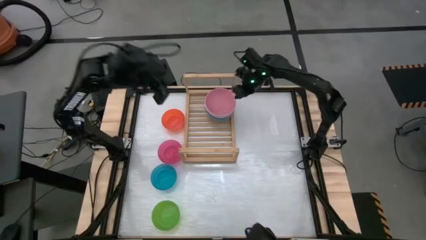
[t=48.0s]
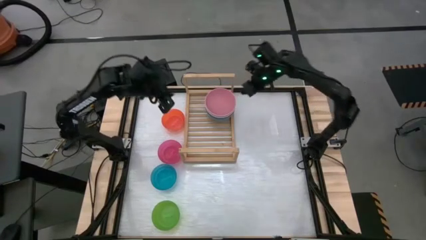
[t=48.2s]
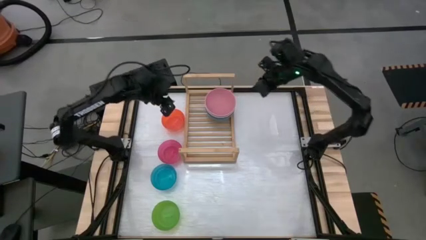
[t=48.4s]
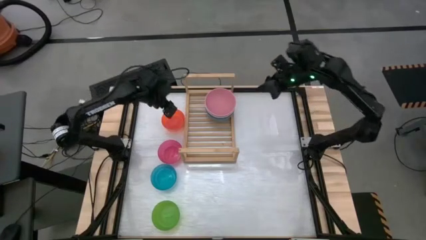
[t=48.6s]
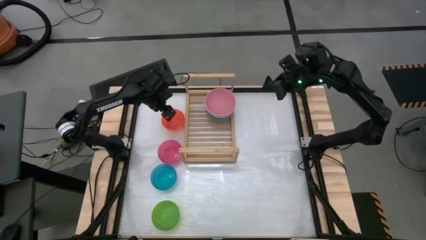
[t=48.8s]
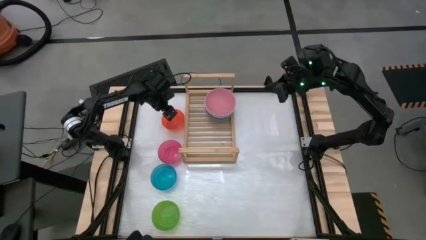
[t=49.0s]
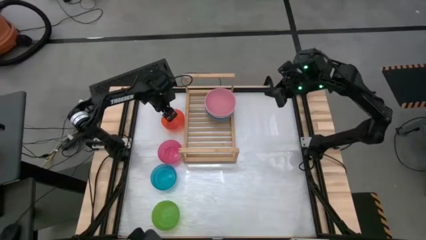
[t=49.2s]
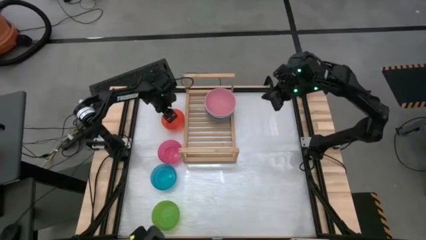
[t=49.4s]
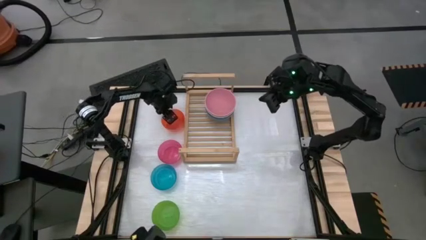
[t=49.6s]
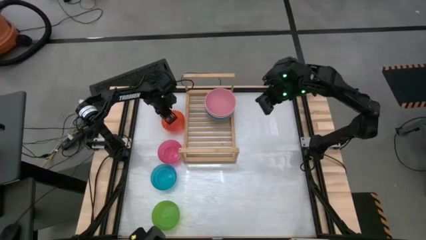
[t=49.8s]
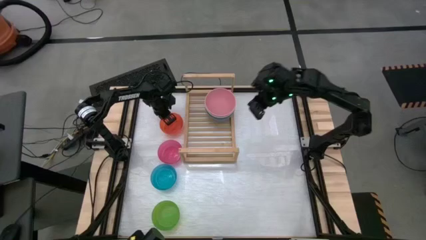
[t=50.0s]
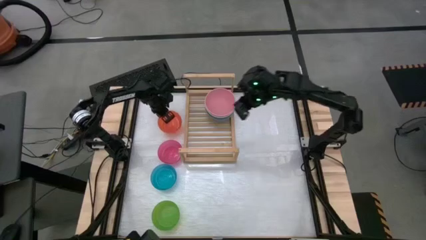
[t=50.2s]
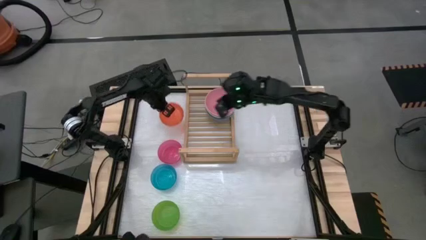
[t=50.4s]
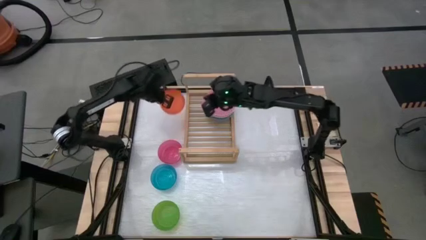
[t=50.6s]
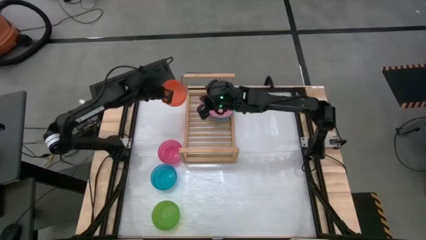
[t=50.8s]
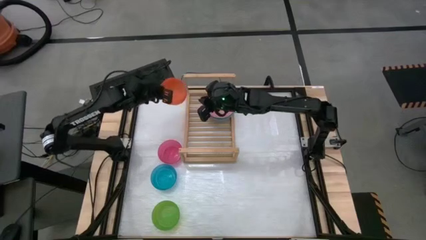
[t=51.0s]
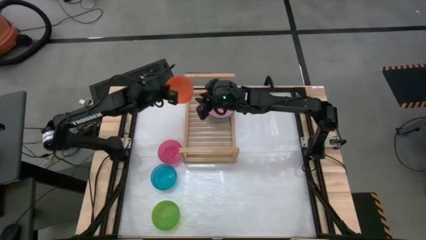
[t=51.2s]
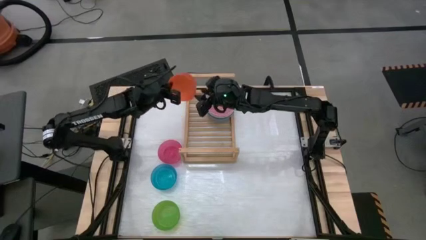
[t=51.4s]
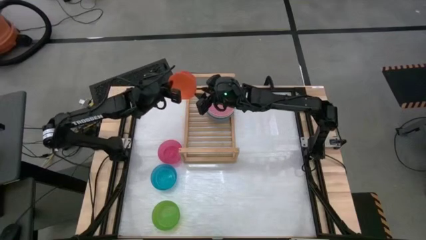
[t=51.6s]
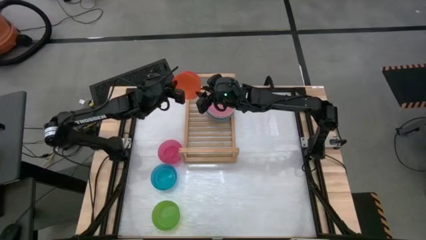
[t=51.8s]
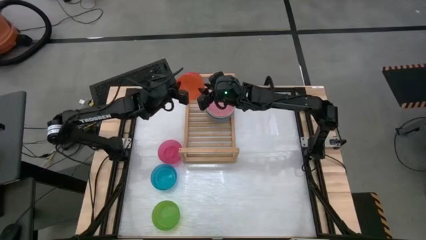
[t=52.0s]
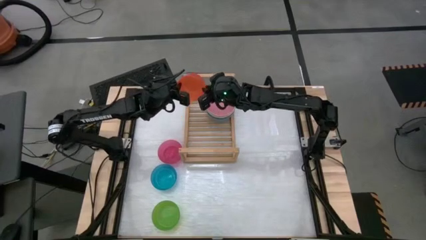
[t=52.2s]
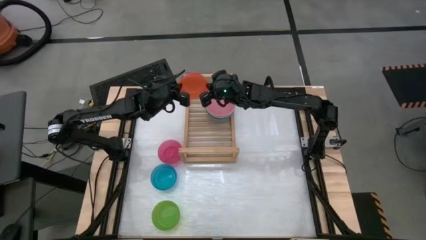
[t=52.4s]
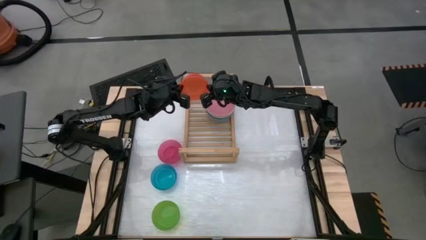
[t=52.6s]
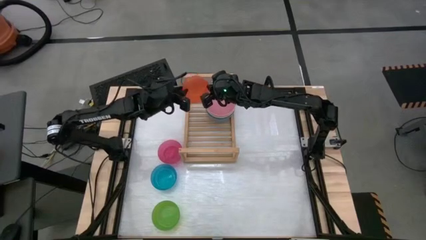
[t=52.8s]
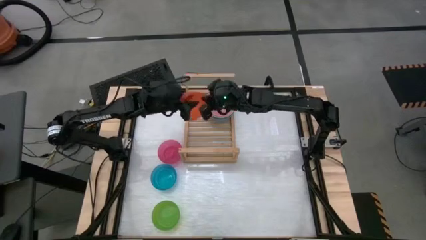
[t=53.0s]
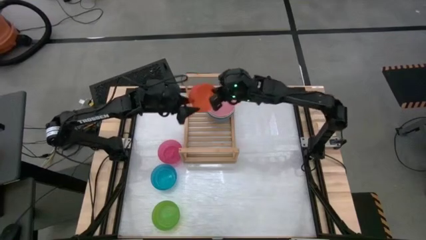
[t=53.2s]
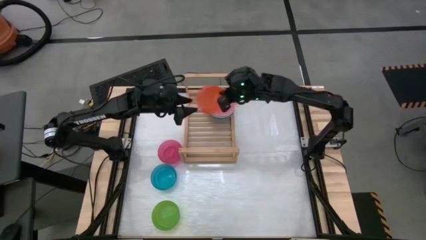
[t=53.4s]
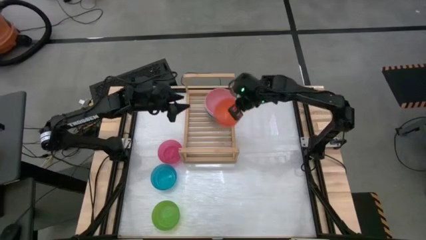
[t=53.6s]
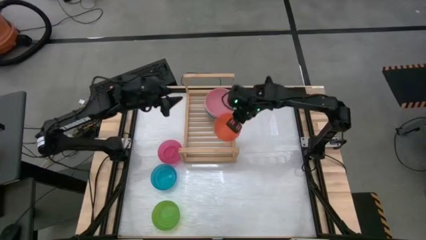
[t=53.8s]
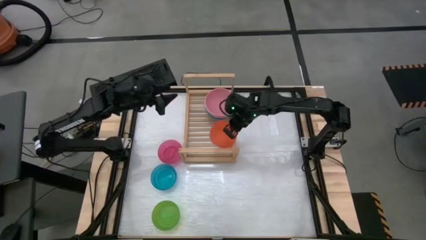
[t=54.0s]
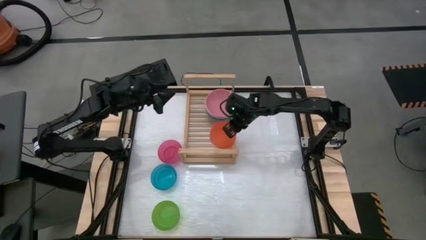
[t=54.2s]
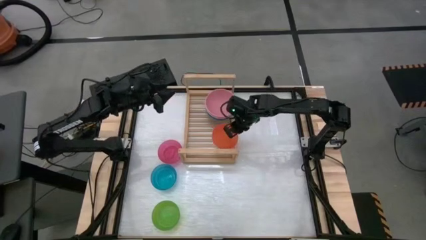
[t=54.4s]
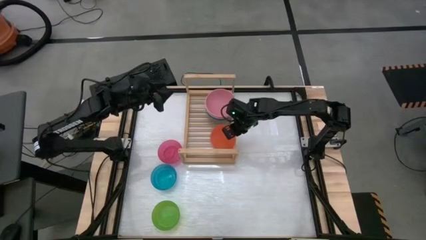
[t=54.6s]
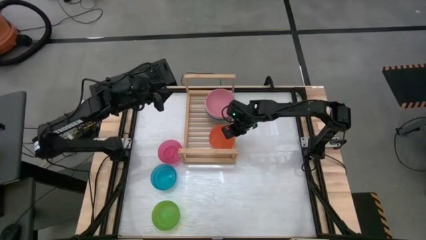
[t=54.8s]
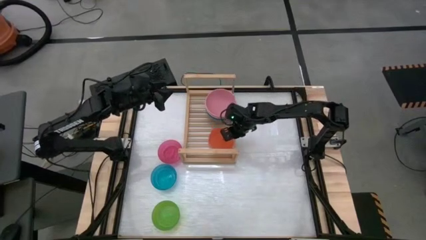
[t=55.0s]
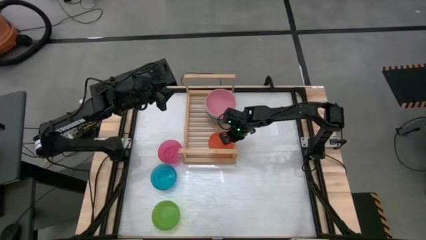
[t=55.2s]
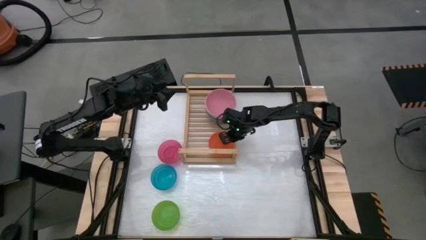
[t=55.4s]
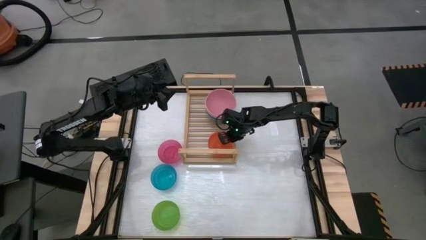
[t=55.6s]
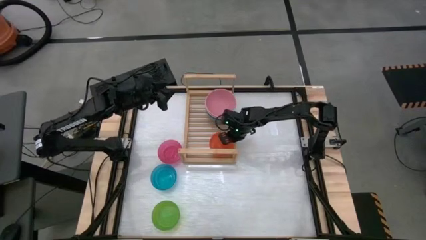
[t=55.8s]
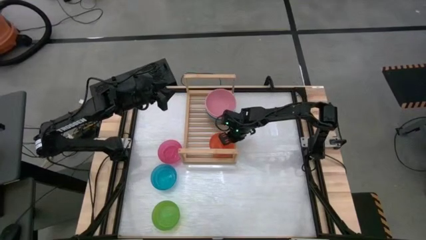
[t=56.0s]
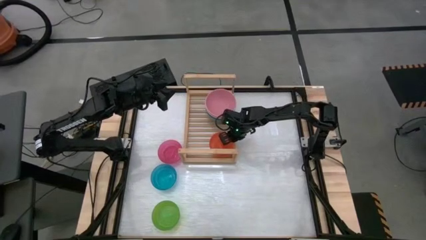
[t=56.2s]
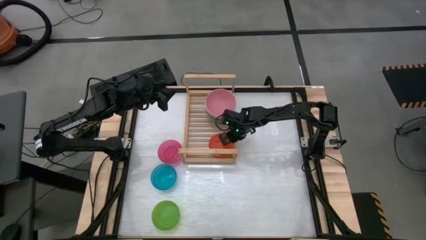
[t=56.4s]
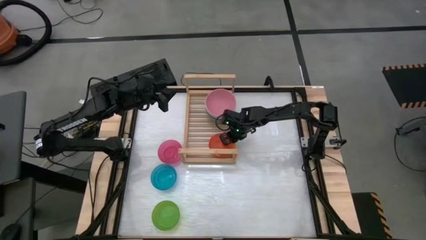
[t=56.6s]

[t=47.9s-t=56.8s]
Task: Place and stack bowls onto a shelf
Put the orange bowl on the wooden shelf

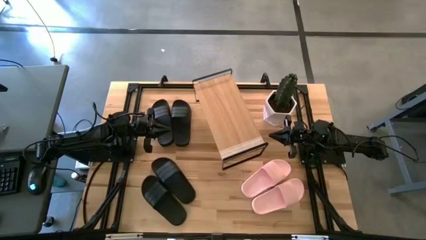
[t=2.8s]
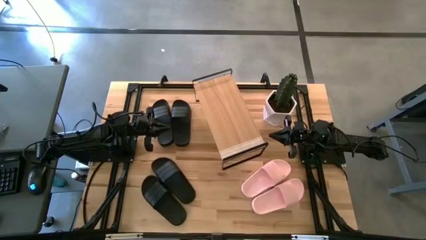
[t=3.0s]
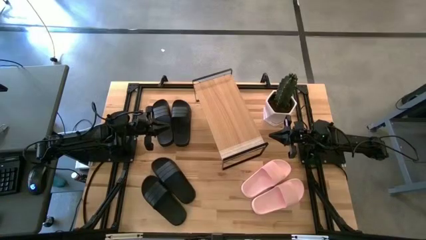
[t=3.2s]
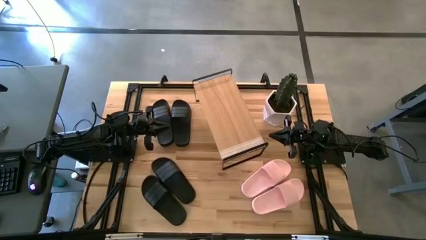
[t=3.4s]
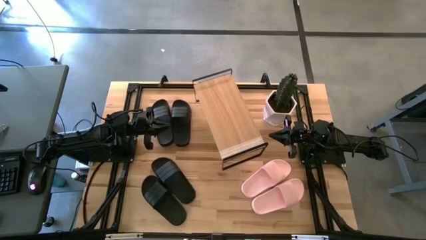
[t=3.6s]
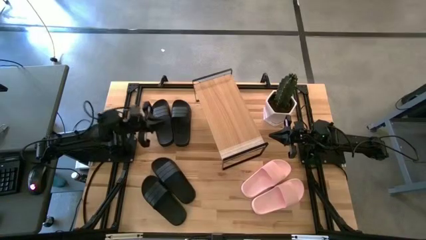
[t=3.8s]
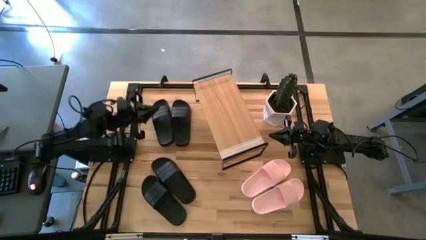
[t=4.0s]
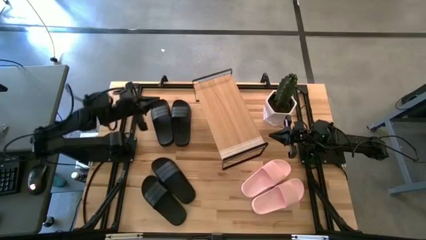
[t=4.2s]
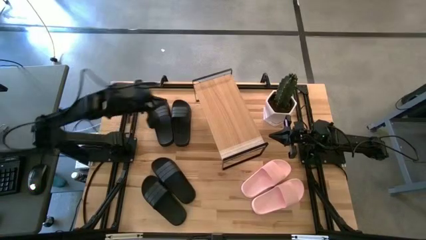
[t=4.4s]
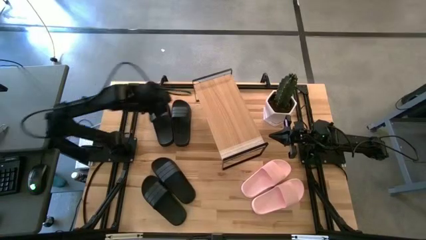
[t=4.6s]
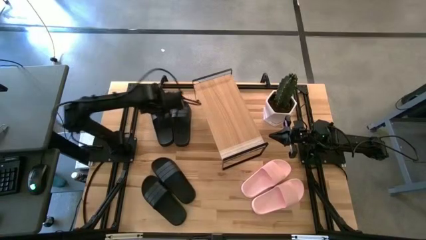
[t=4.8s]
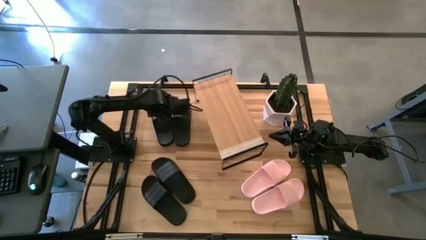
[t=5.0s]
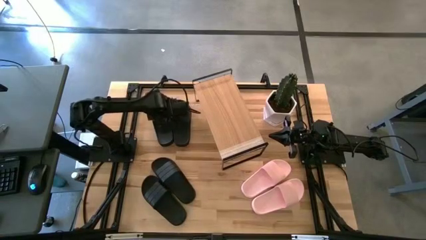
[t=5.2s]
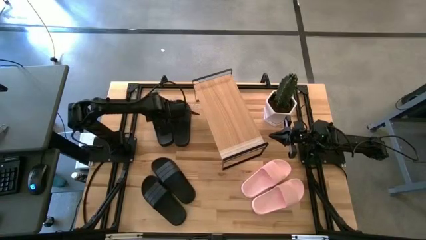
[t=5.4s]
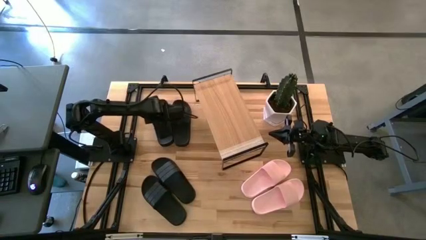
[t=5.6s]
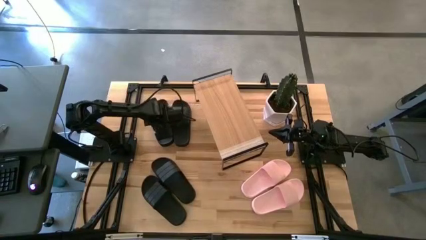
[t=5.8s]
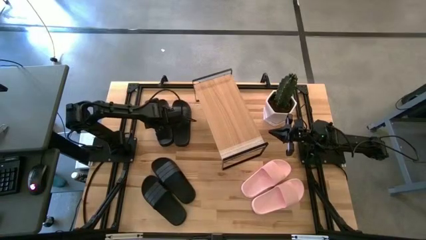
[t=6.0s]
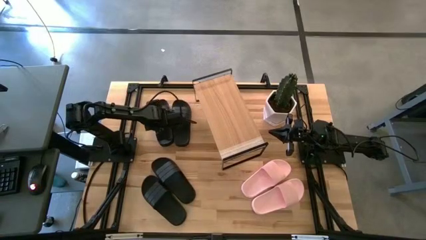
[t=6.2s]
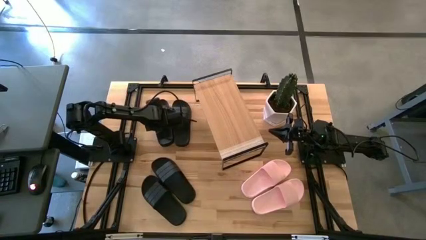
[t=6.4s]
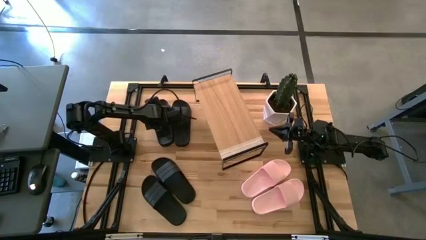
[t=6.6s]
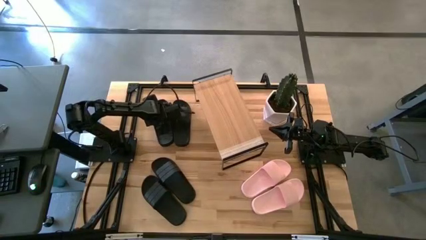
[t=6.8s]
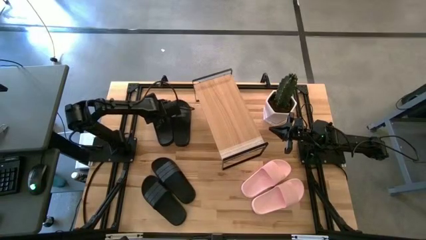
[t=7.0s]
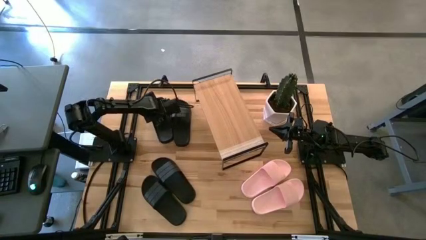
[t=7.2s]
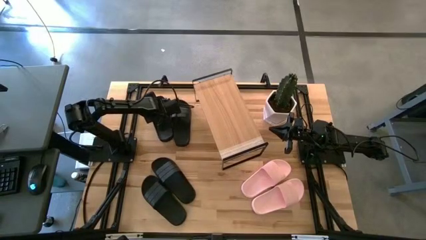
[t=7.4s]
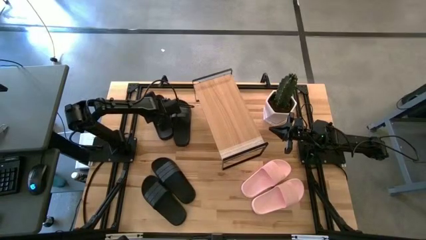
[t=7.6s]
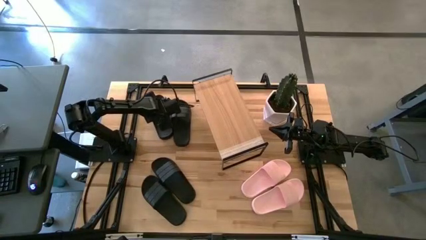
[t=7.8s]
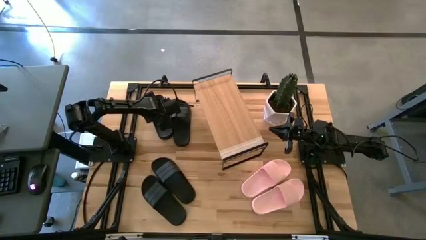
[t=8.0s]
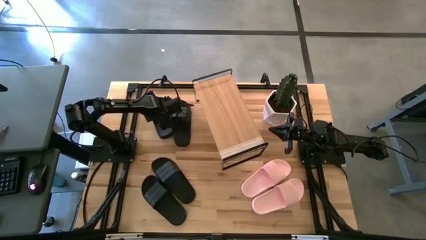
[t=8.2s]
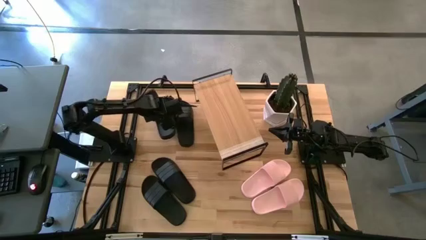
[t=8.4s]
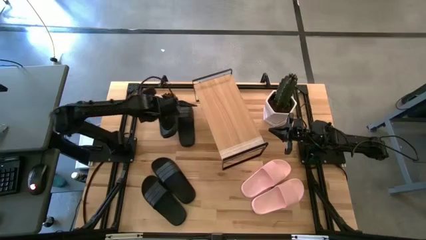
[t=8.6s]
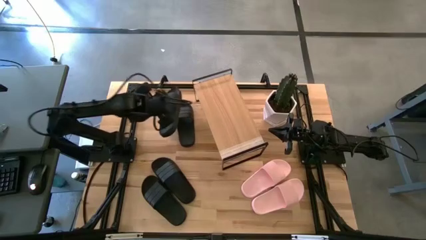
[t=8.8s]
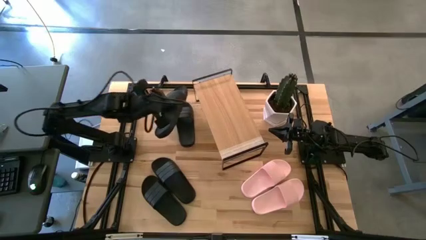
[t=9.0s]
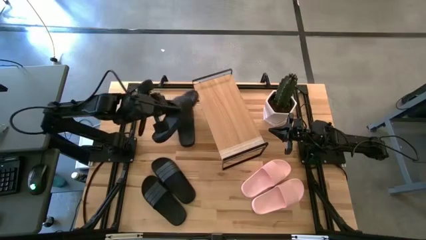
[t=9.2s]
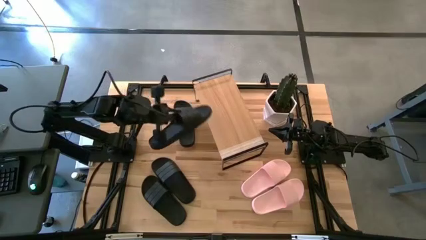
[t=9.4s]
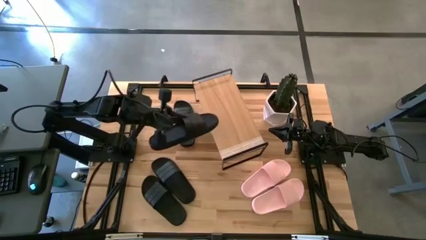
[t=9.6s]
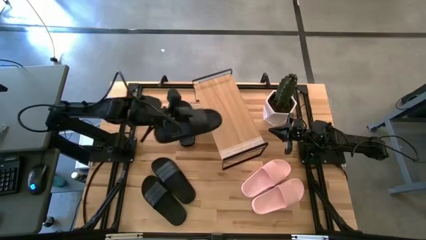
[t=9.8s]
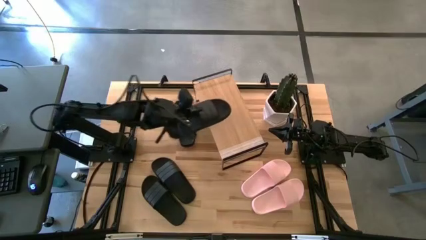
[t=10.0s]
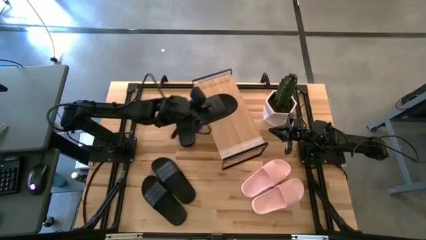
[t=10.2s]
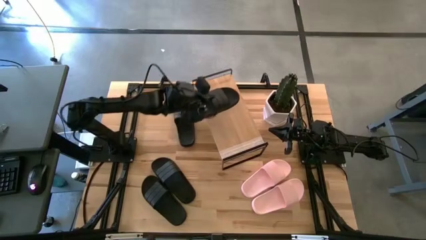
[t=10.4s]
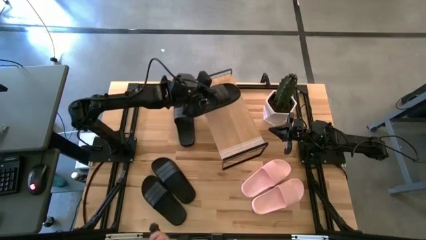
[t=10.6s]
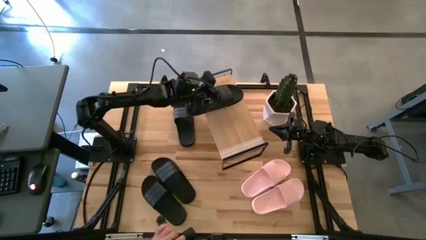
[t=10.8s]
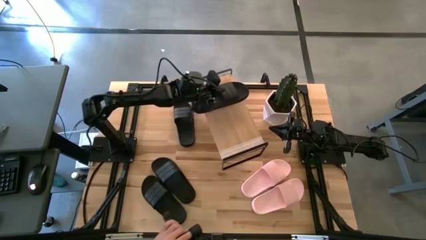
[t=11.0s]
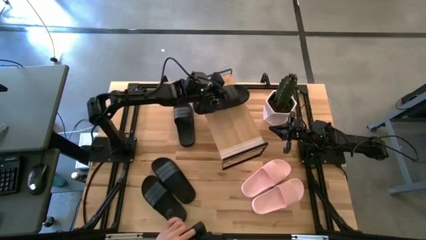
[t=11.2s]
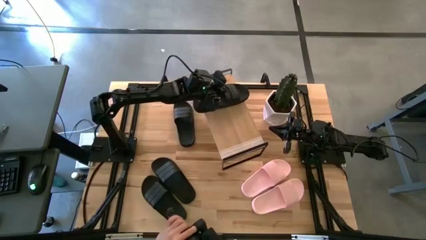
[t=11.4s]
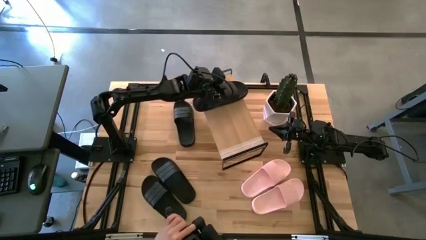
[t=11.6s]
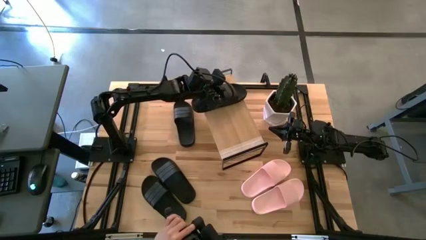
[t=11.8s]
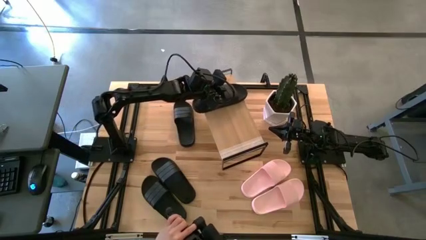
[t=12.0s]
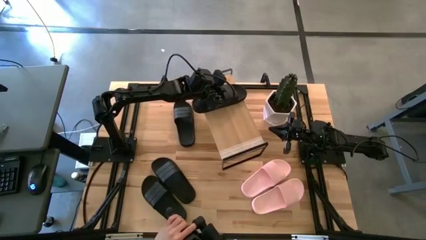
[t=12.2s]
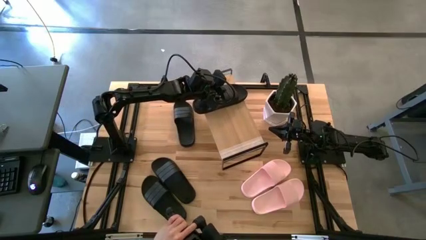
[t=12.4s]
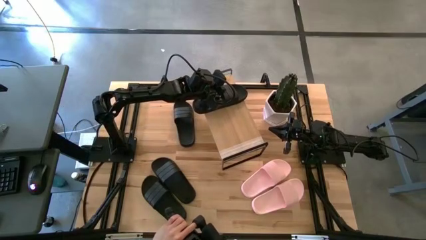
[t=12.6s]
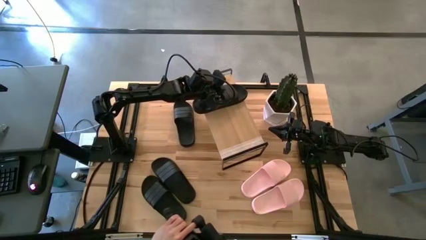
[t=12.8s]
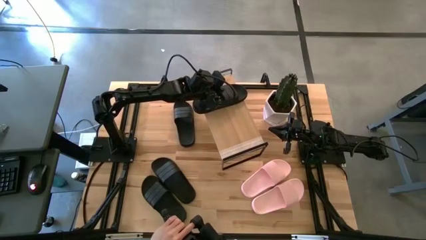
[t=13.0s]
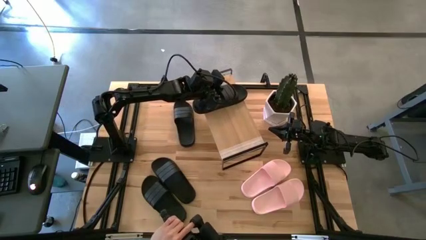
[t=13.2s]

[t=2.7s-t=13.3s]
Task: Pick and place slides into the shelf
Put the black slide on the shelf
